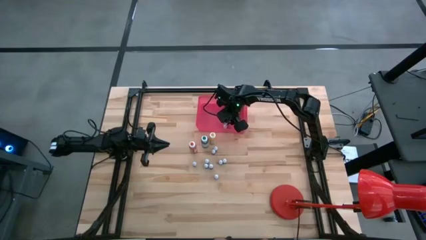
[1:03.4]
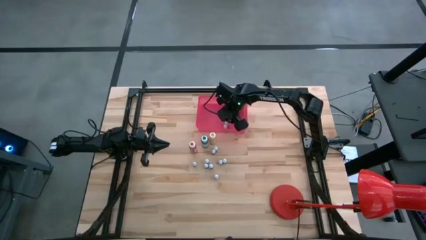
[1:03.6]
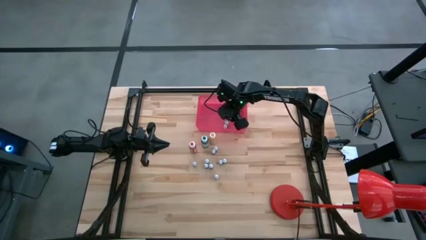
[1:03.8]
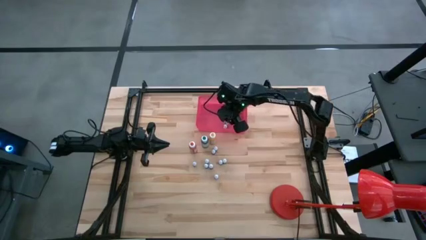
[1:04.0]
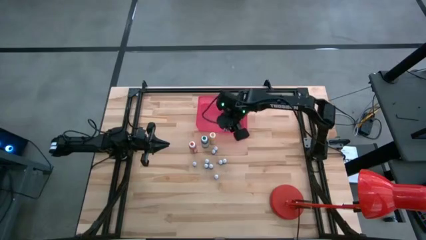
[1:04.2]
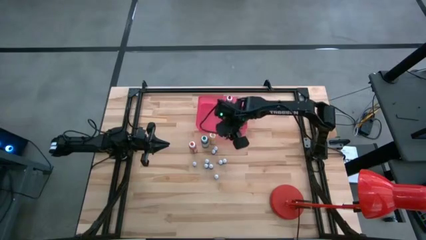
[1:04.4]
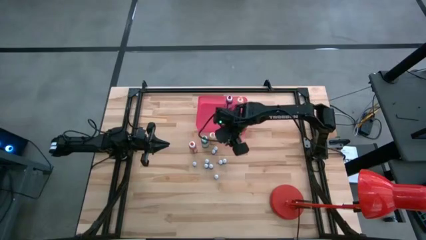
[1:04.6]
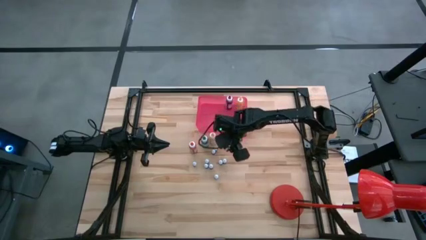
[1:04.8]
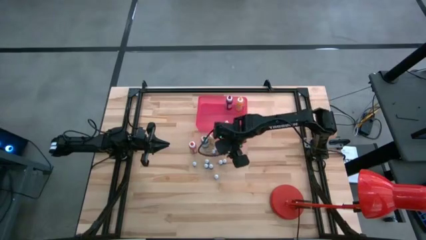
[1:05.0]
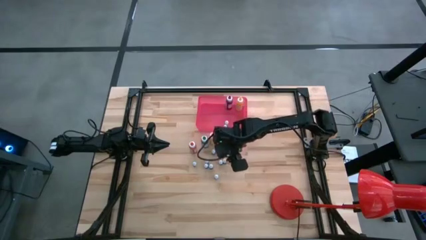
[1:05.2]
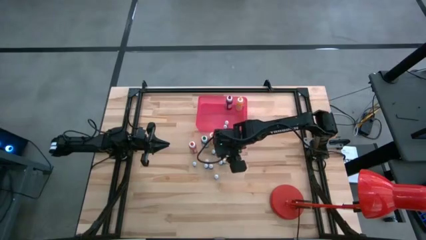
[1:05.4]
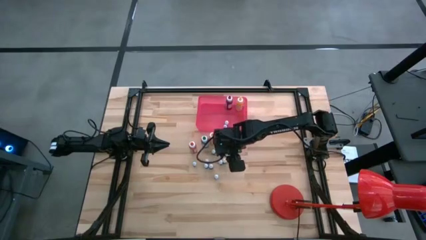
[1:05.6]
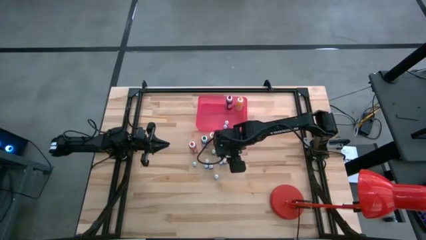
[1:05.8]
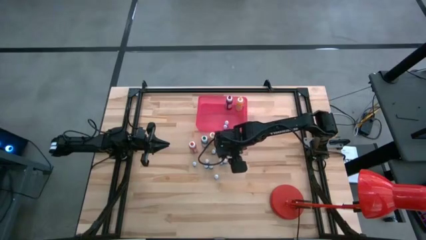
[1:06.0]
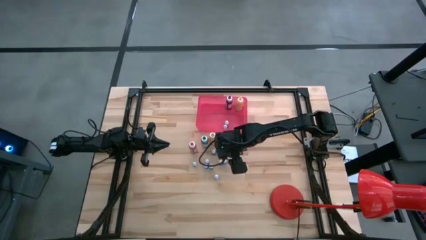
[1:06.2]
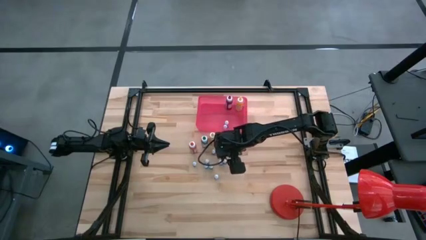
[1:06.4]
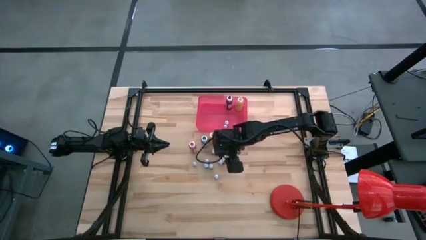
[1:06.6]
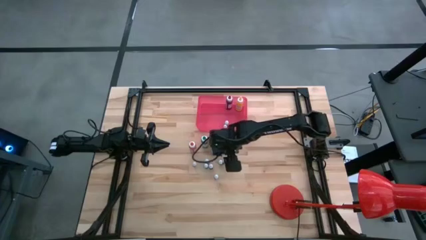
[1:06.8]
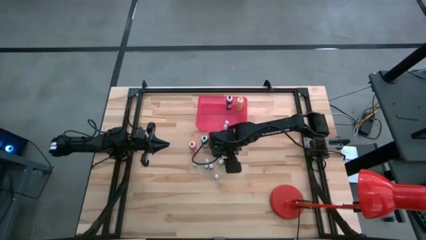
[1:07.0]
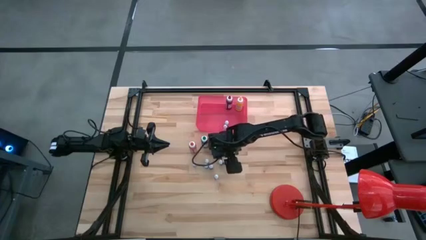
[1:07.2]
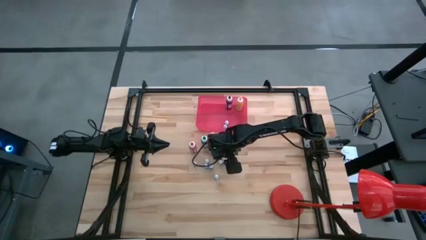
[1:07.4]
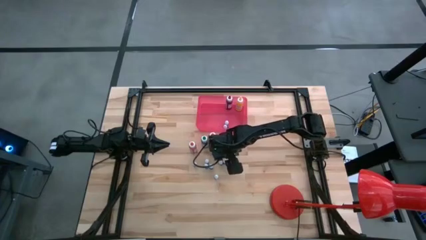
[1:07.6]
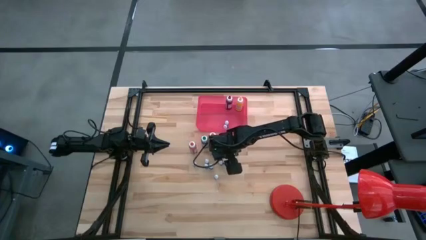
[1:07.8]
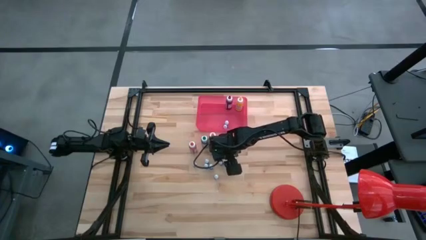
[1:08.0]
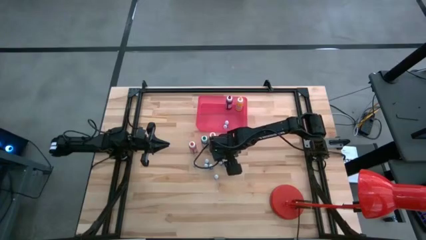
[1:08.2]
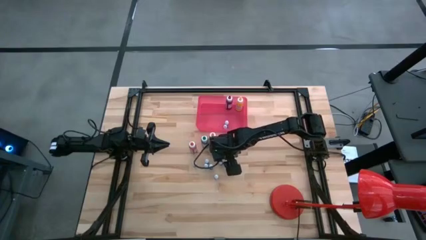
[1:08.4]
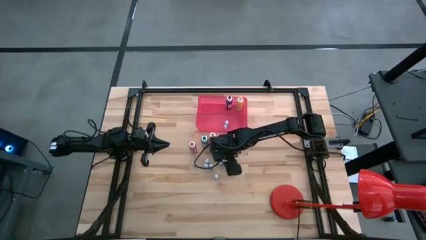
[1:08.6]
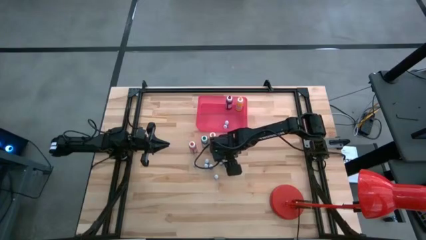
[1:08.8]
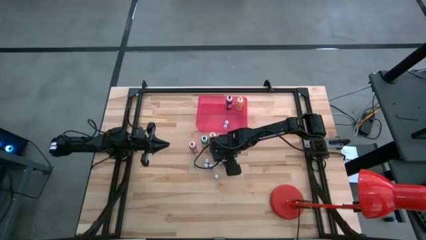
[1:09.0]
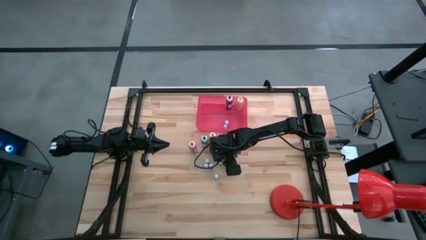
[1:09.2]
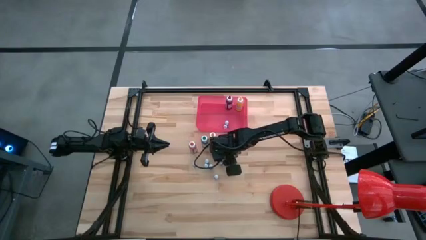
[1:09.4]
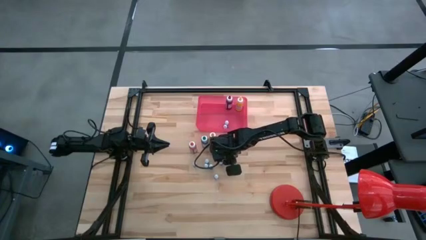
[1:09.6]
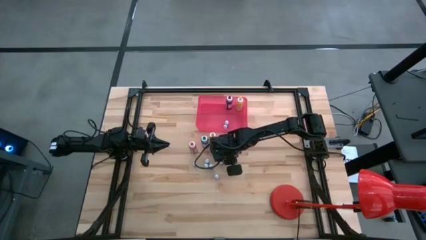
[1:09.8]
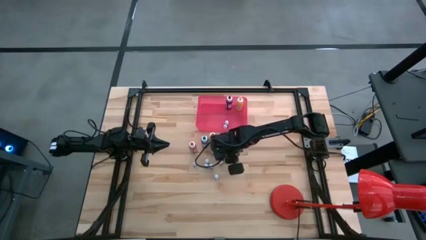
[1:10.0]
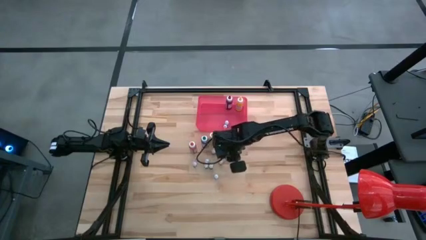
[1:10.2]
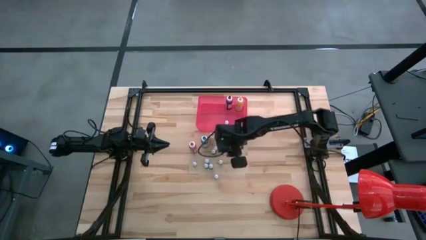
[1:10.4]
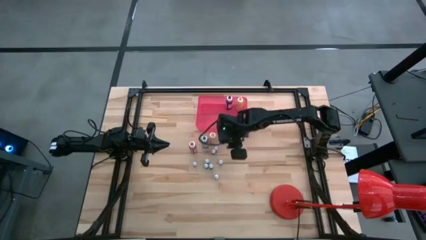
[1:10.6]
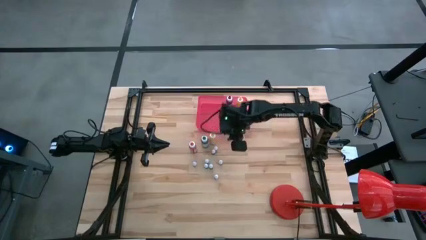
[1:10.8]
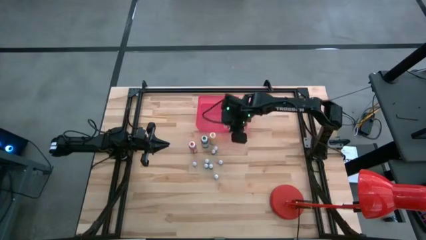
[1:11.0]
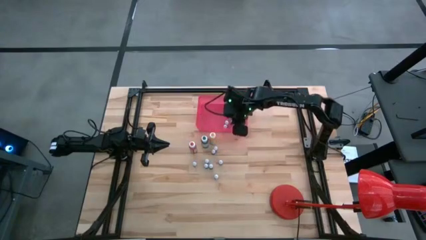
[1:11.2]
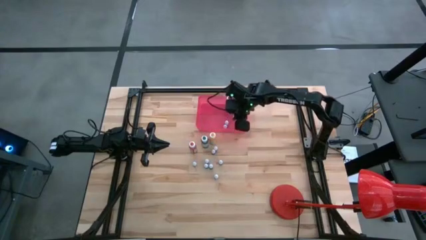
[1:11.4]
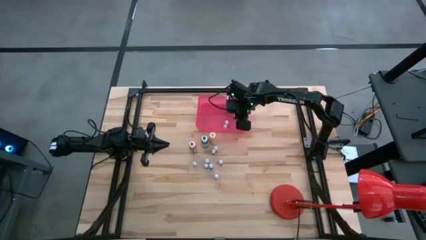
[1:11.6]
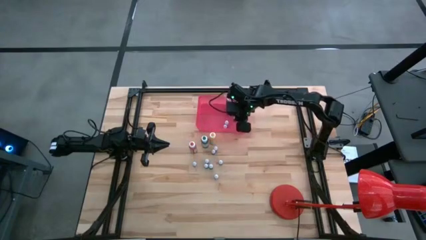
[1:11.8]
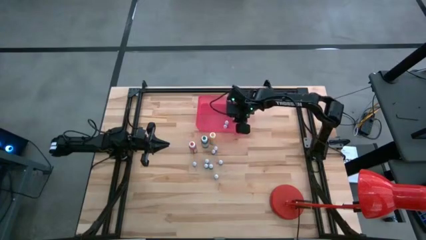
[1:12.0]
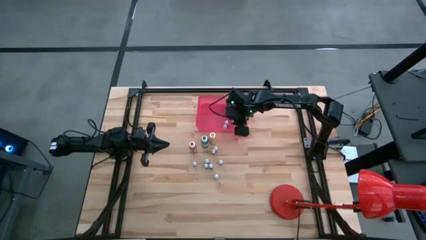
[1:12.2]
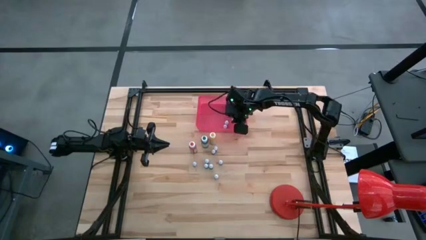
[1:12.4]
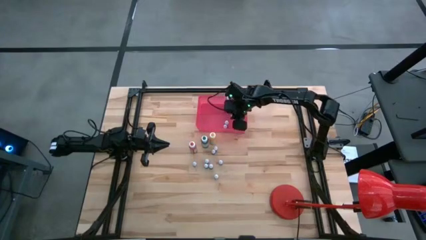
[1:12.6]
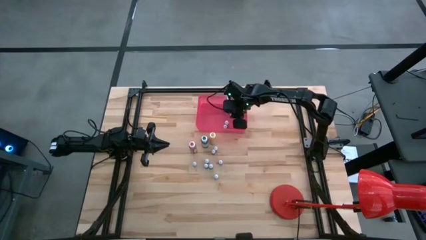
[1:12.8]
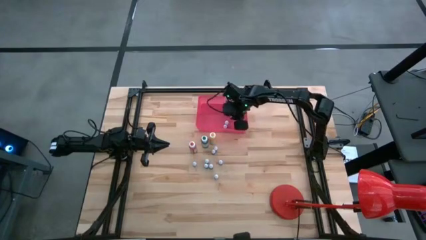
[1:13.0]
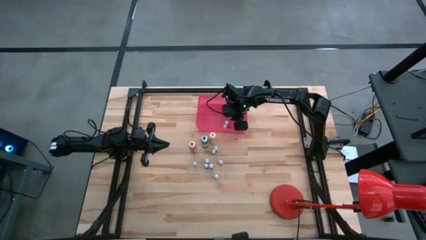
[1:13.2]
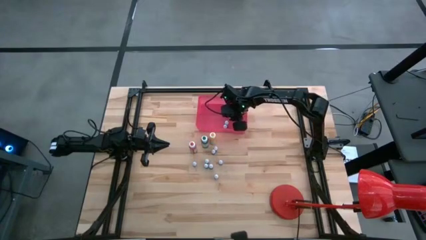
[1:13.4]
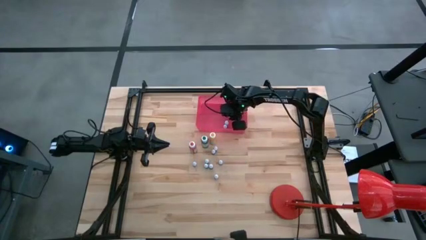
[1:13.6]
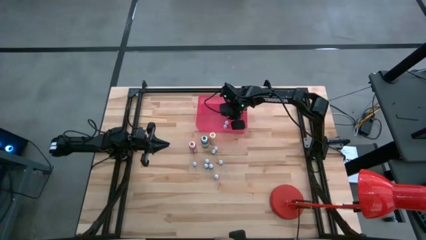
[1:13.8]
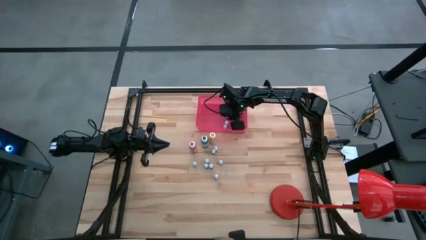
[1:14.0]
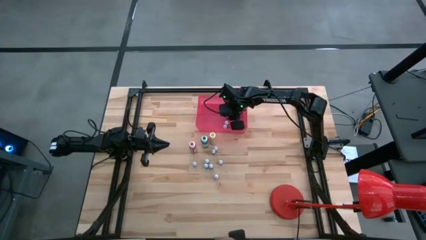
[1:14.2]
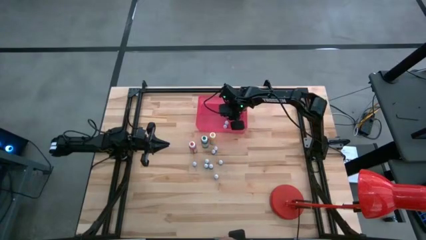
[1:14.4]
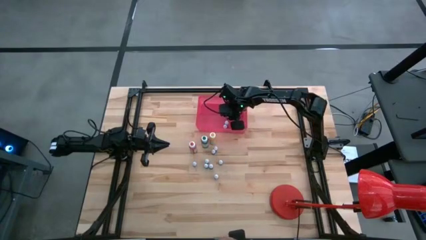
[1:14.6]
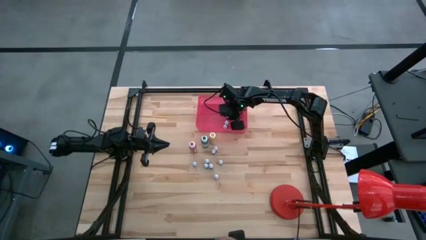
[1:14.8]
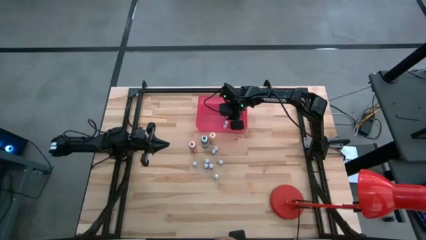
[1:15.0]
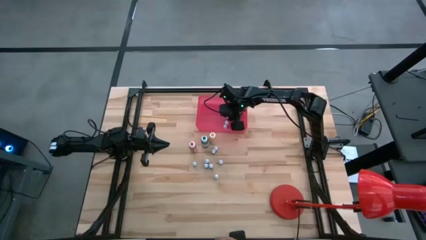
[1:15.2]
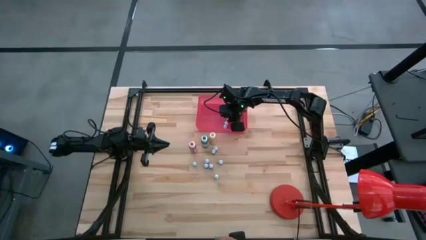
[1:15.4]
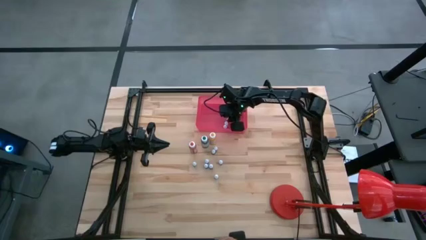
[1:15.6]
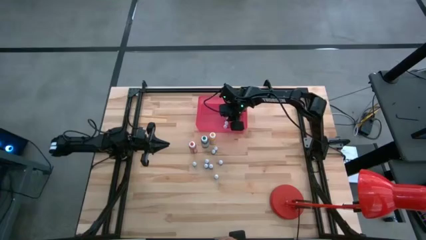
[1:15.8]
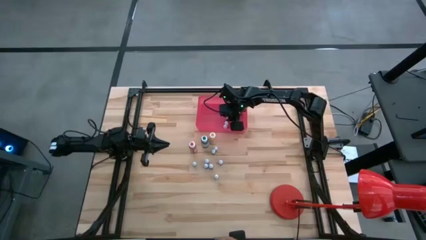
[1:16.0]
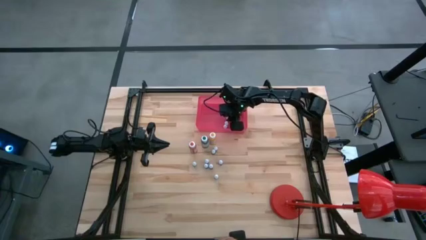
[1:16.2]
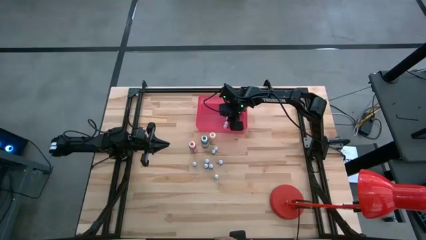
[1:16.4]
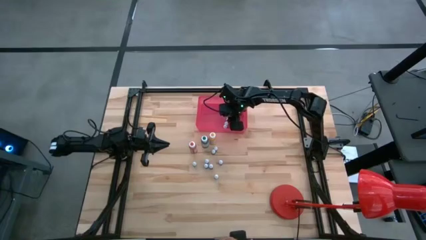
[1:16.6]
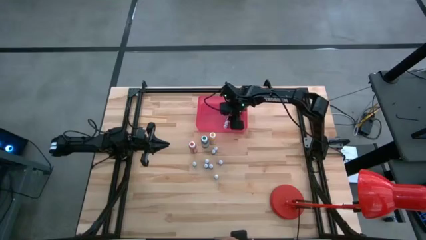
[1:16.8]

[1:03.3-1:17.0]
Task: Pick & Place food coloring
Put the small purple food coloring bottle into the pink bin

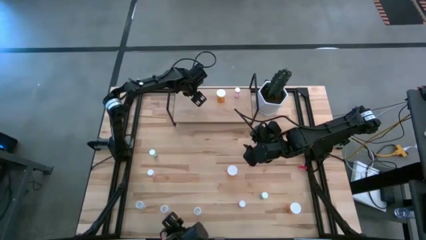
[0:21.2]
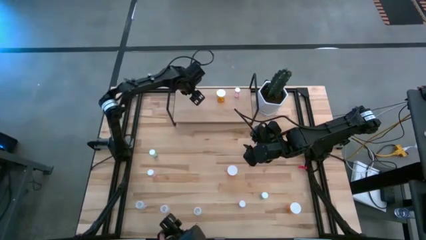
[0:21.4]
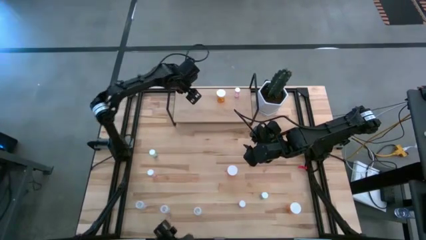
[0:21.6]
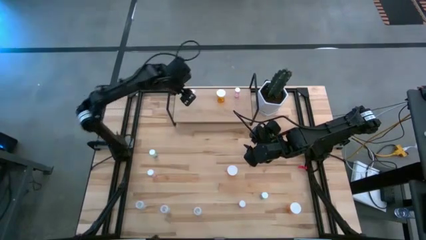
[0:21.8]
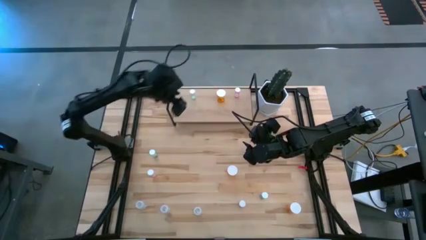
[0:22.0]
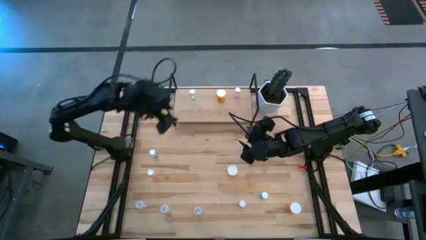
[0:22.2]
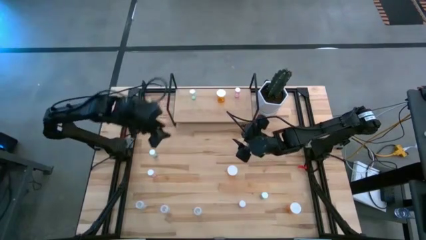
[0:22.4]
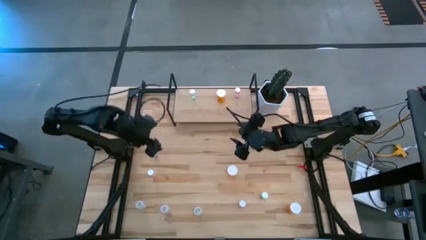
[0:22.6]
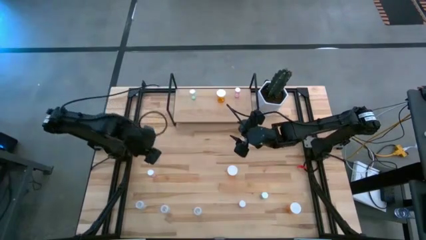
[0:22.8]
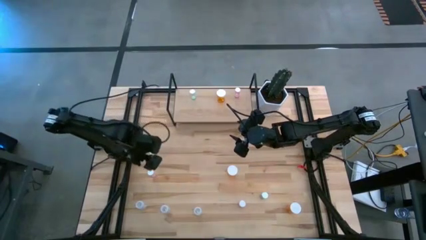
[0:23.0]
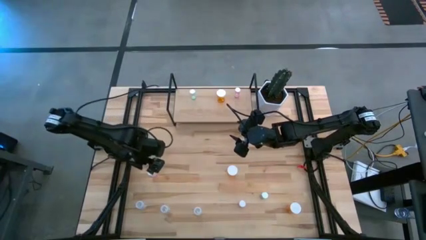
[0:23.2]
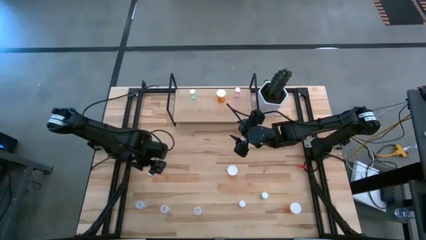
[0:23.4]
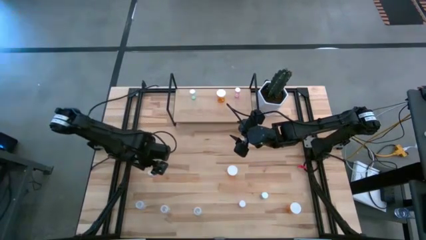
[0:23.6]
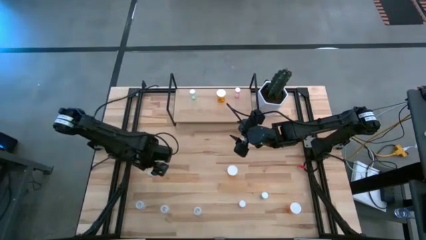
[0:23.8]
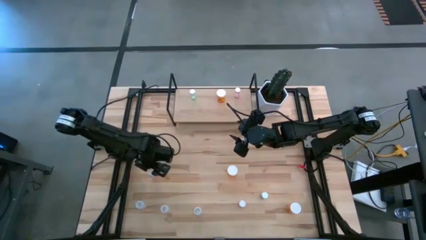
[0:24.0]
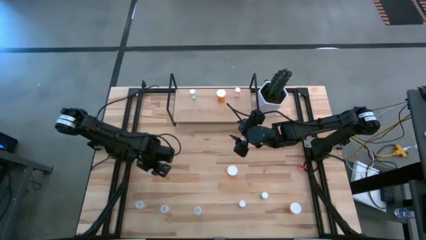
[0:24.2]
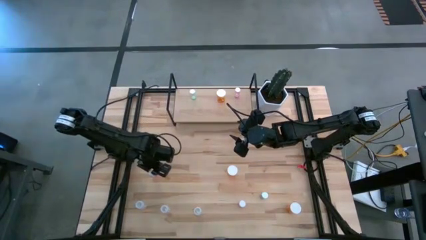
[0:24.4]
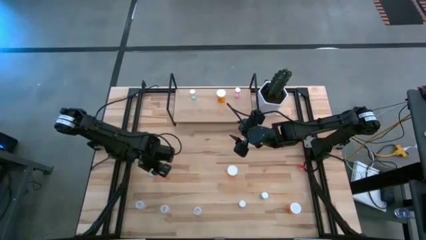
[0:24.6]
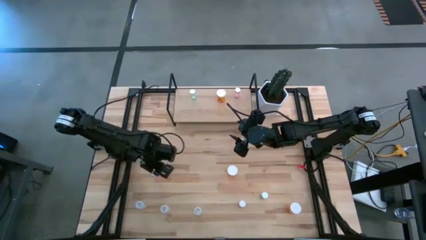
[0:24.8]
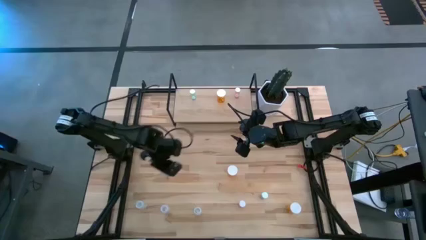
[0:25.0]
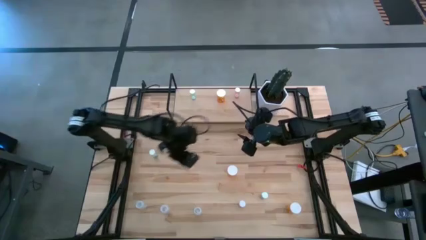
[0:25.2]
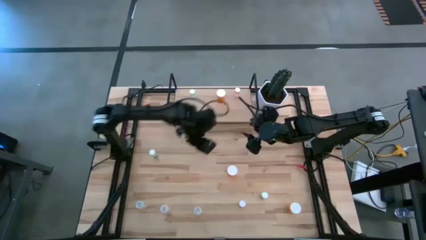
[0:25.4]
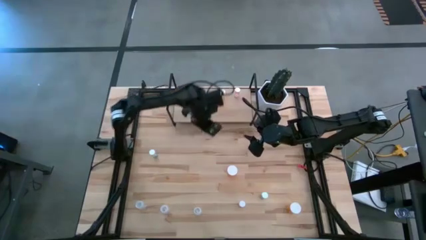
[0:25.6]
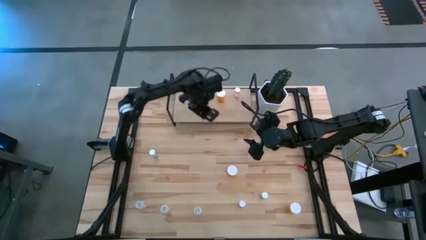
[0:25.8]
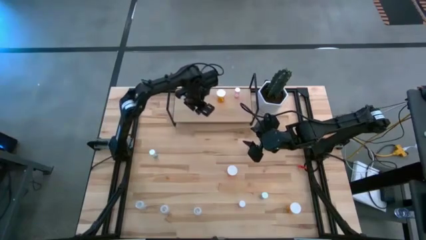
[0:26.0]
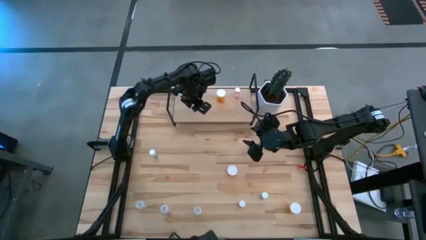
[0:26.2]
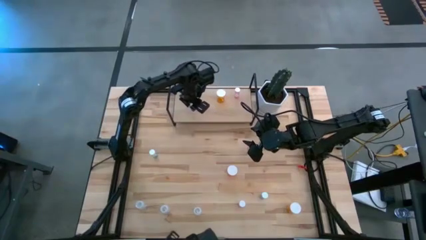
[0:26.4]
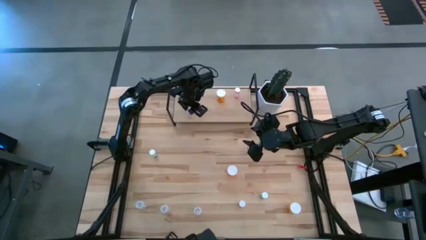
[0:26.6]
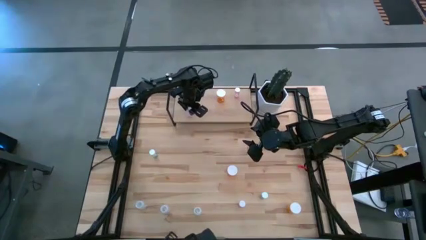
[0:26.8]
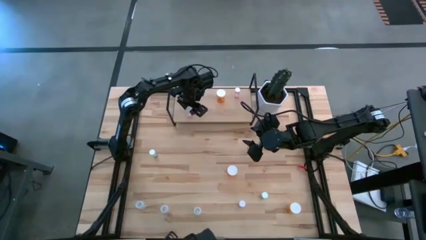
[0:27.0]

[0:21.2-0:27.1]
Task: Pick and place medicine bottles onto shelf by color
Put the left pink pill bottle on the shelf
